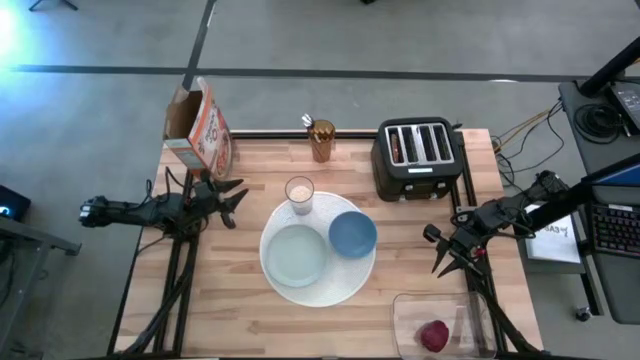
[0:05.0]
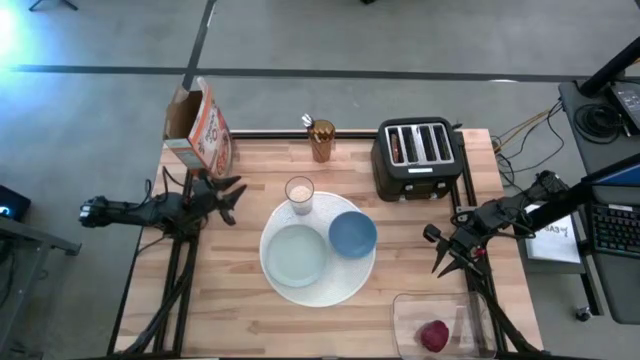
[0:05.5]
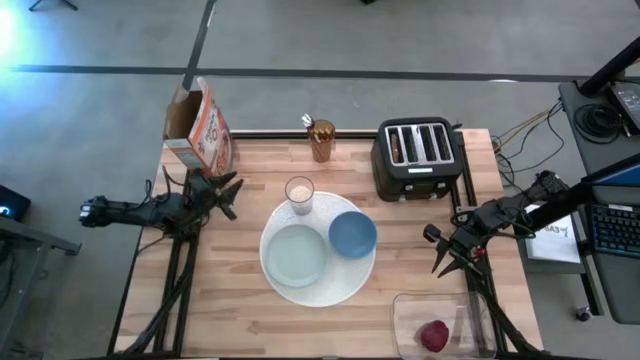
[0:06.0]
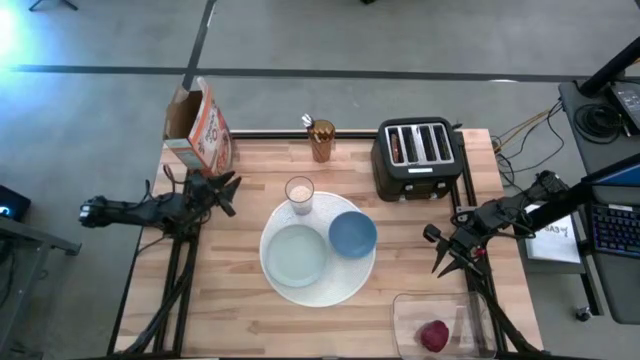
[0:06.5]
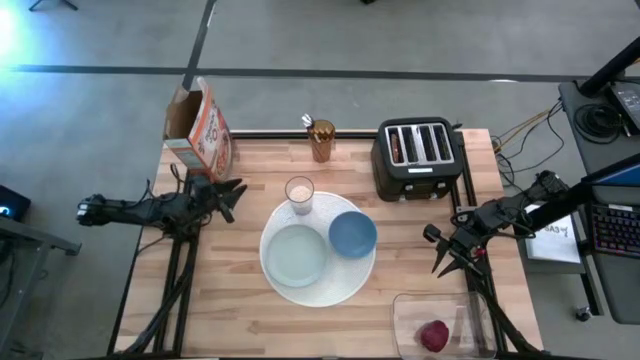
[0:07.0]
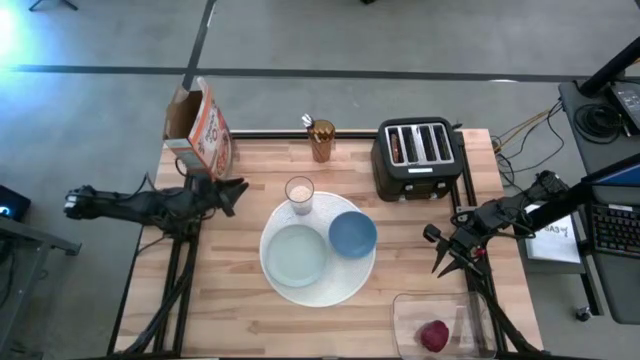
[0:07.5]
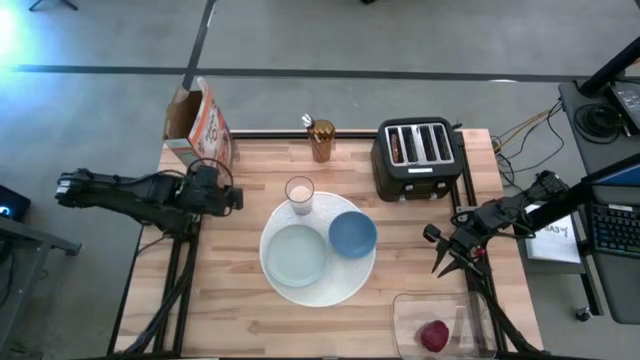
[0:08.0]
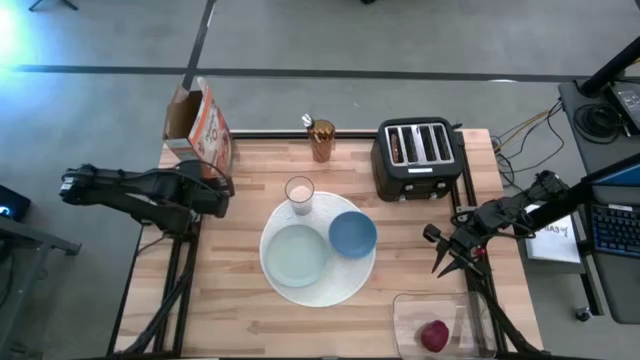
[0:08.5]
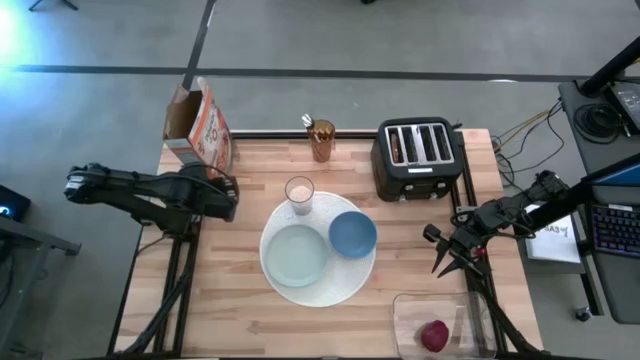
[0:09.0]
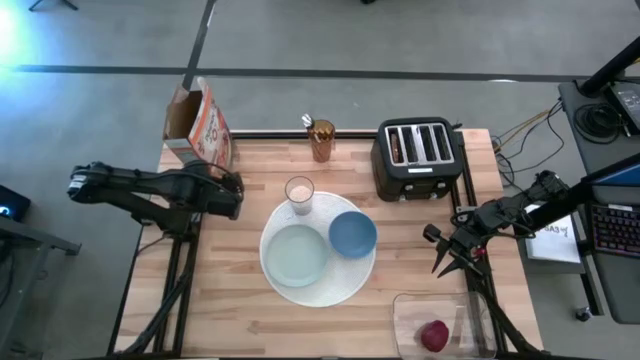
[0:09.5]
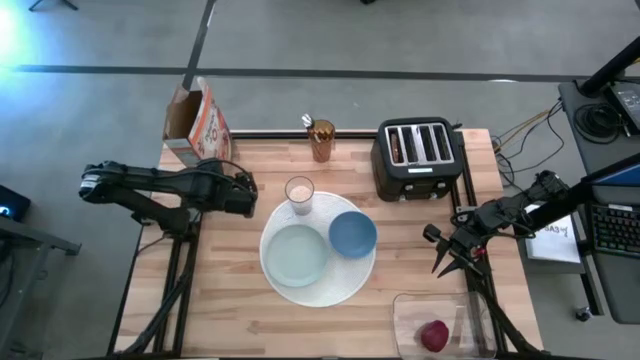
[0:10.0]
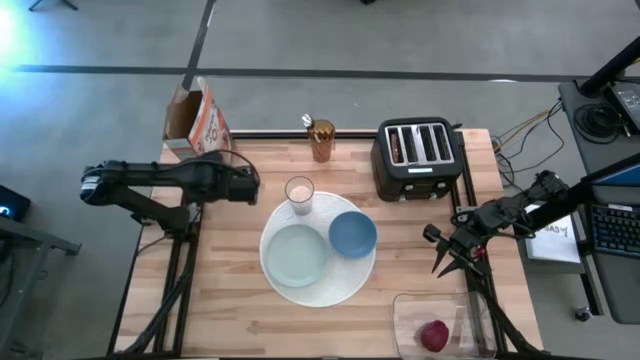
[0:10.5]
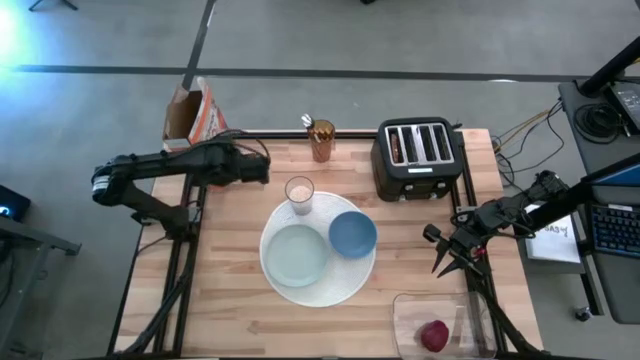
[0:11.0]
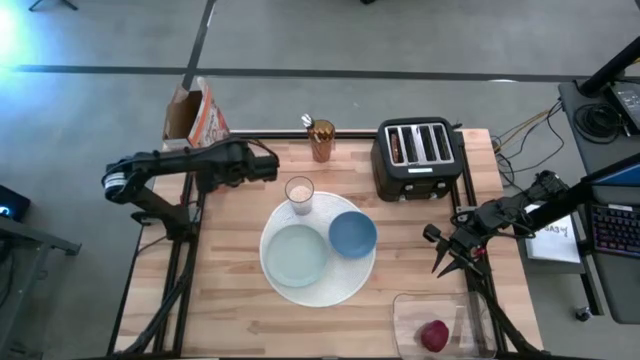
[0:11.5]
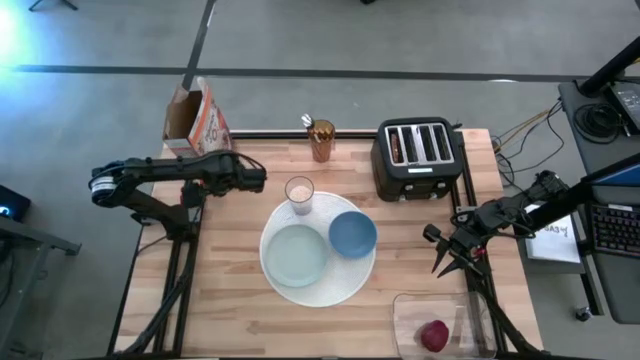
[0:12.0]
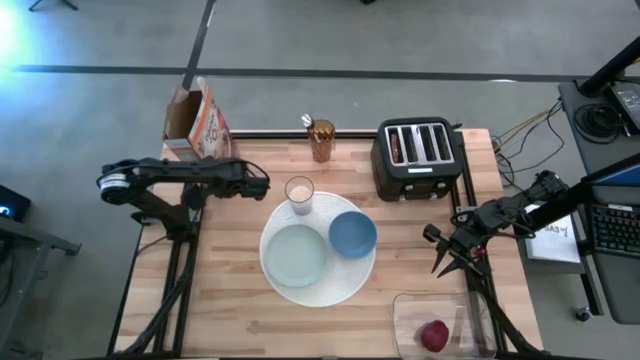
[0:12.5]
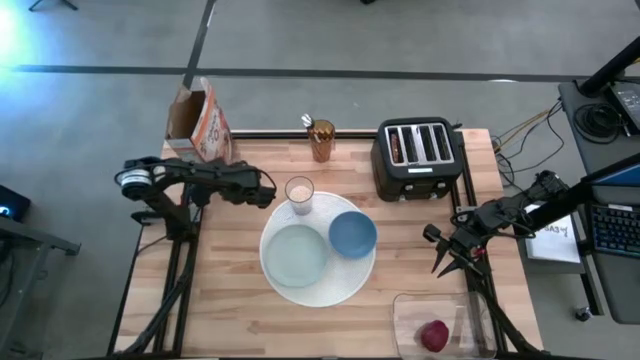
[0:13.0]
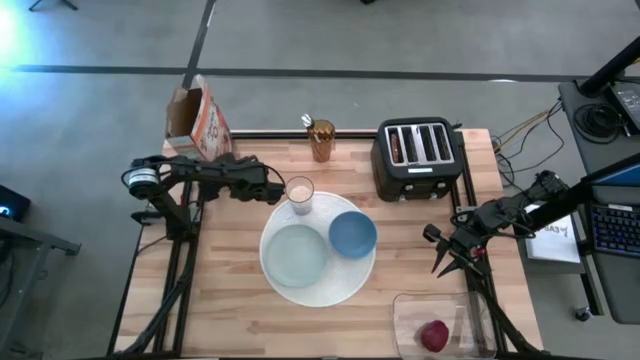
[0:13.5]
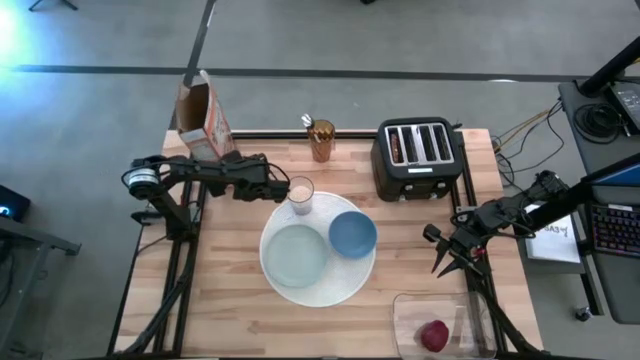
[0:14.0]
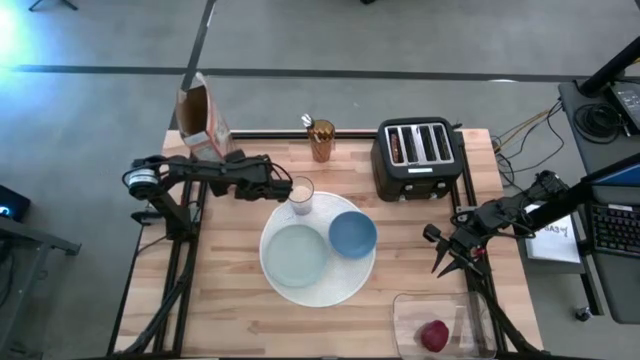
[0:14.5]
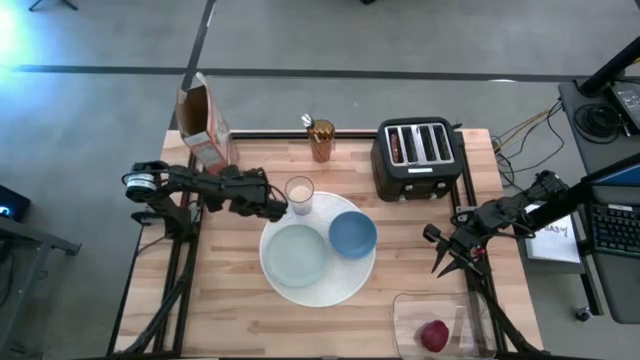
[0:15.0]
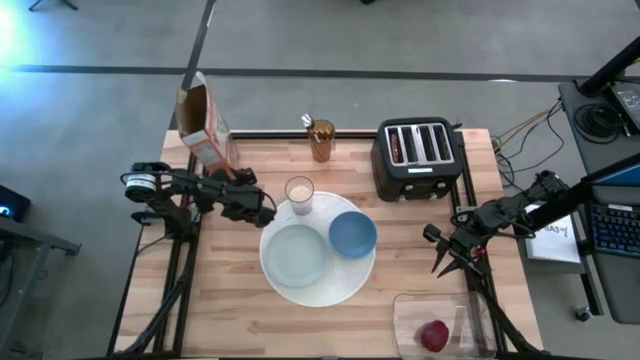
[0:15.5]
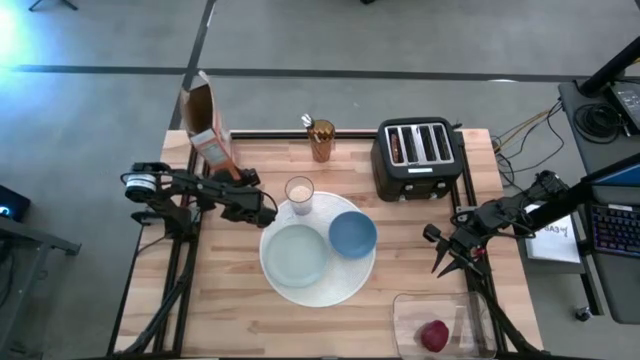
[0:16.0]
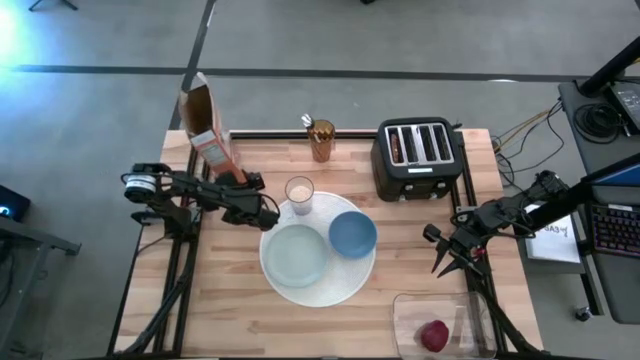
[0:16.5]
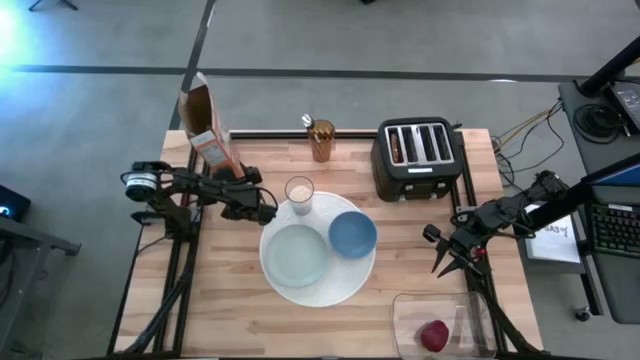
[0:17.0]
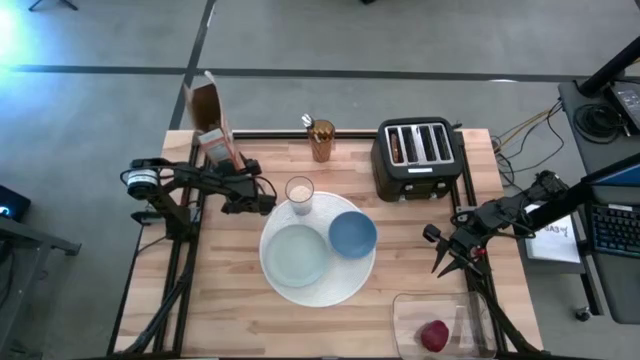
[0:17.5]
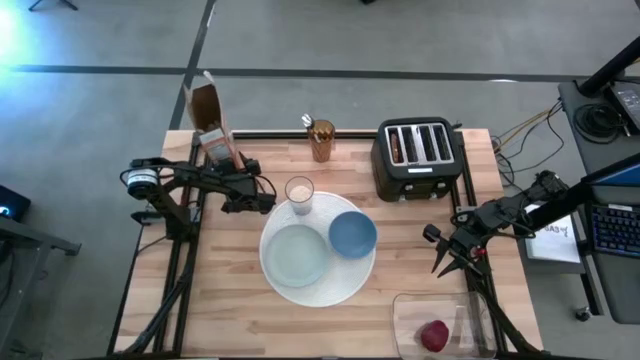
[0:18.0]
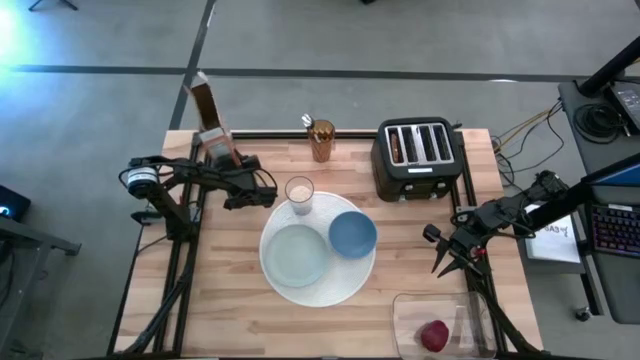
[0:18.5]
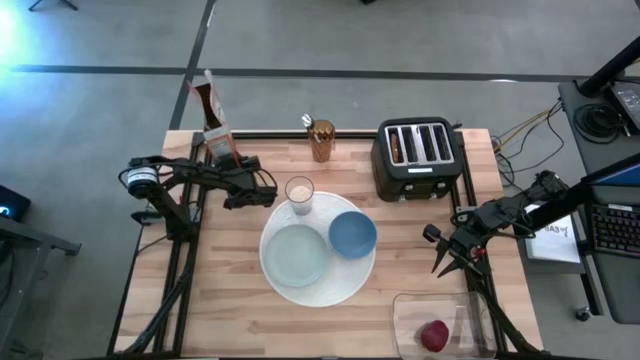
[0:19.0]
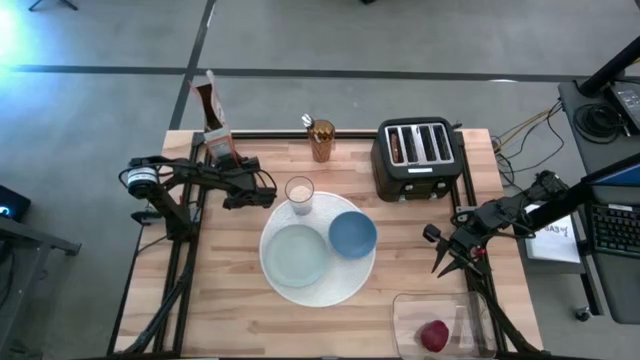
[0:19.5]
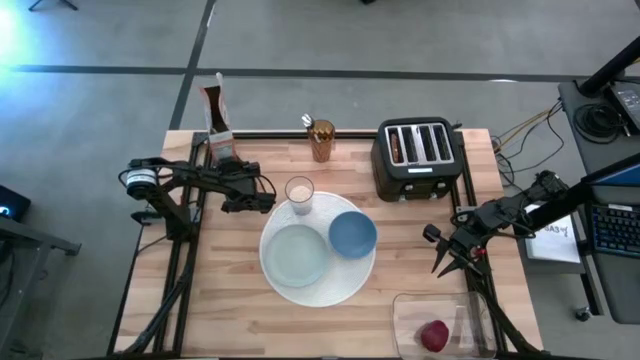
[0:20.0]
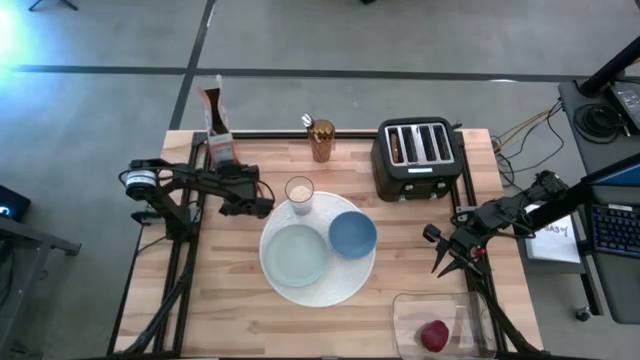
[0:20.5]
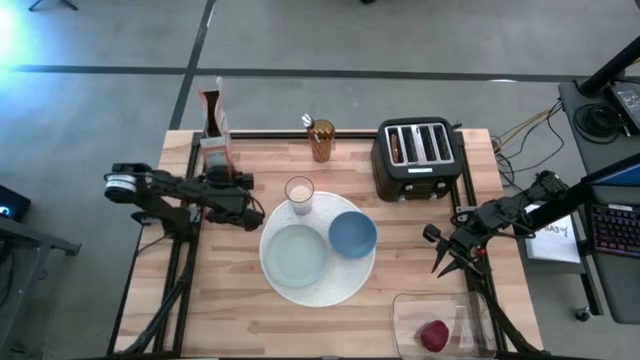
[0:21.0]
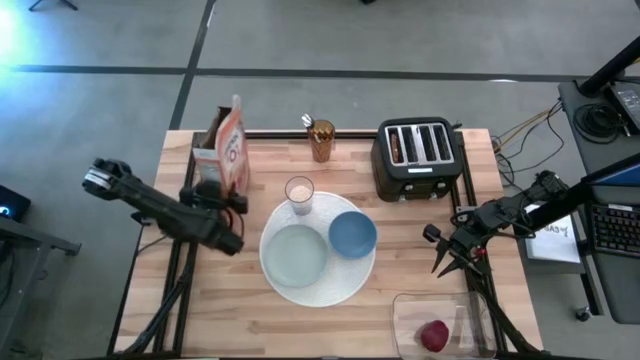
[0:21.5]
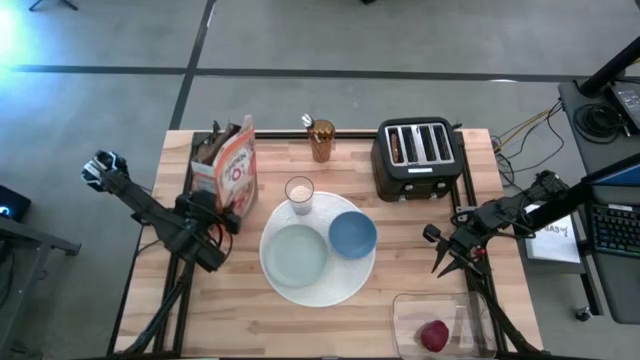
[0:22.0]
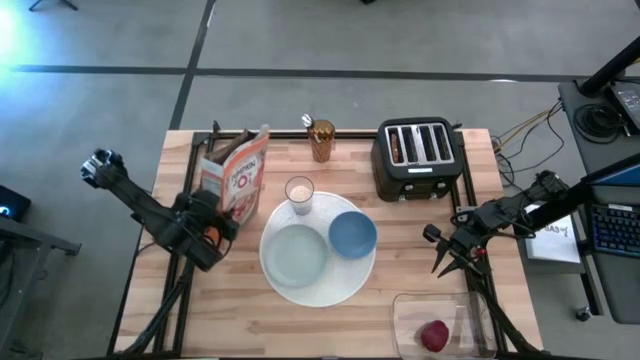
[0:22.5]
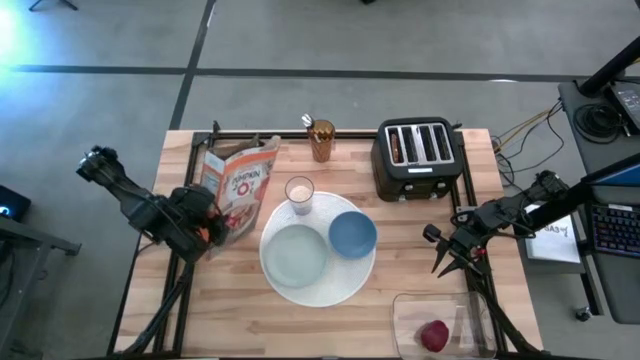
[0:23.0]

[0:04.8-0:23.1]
Task: Arrange a breakfast setting
Pour the cereal into the bowl
